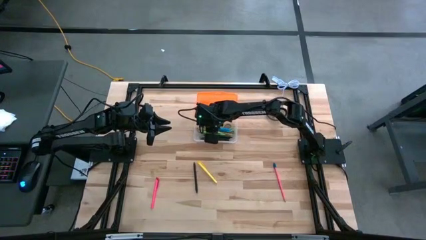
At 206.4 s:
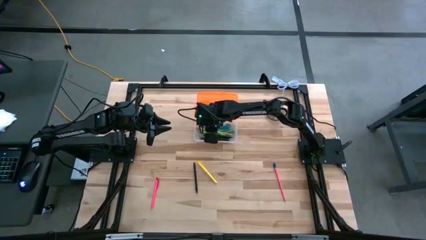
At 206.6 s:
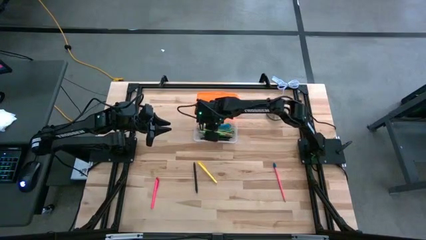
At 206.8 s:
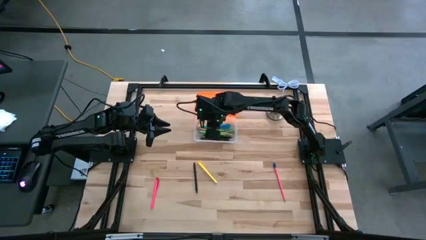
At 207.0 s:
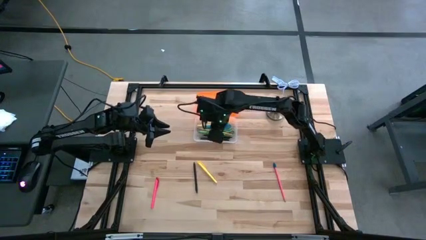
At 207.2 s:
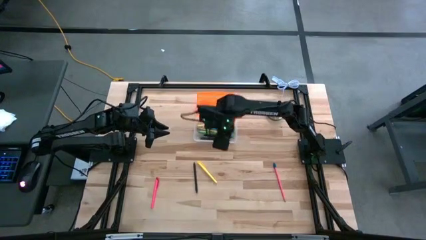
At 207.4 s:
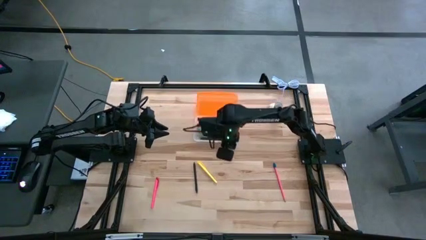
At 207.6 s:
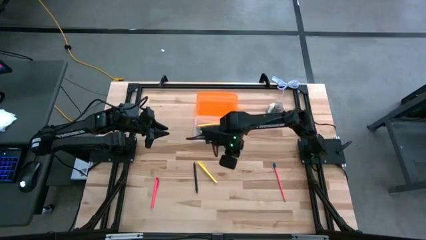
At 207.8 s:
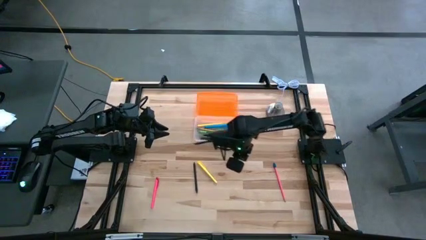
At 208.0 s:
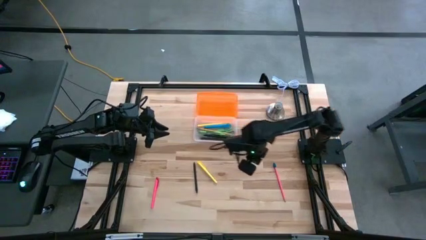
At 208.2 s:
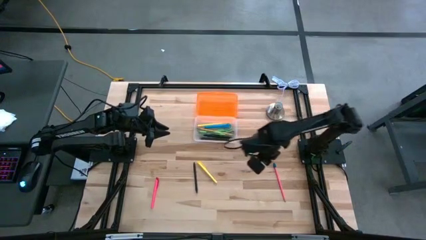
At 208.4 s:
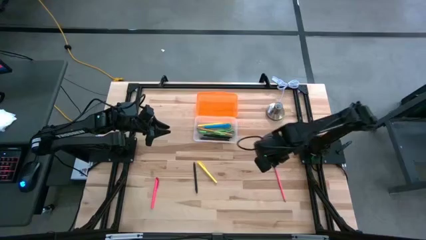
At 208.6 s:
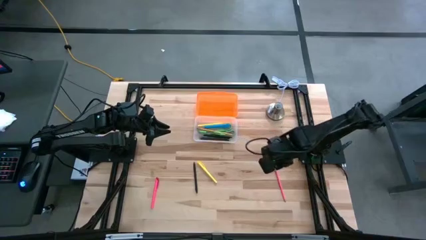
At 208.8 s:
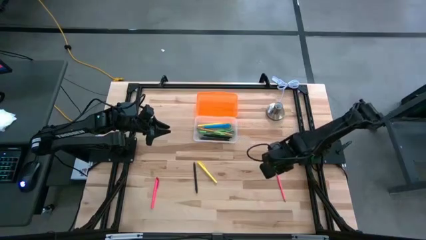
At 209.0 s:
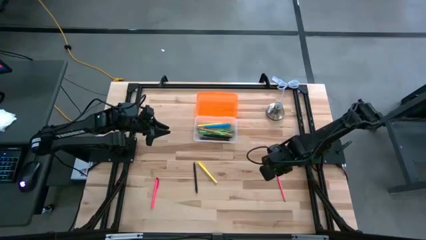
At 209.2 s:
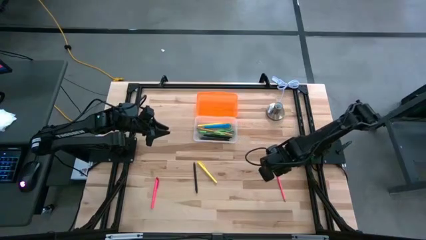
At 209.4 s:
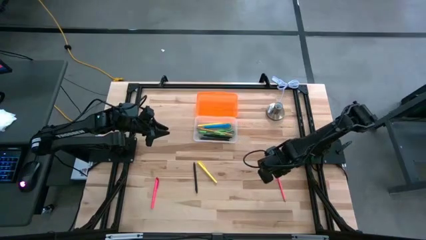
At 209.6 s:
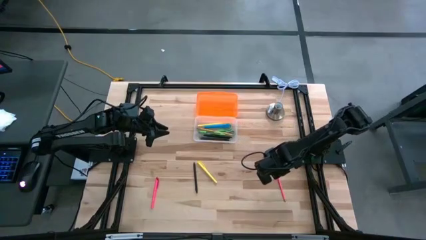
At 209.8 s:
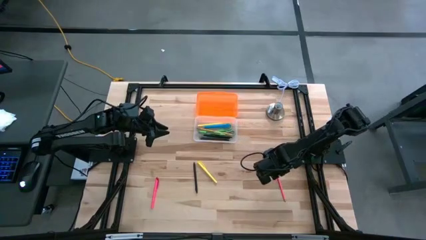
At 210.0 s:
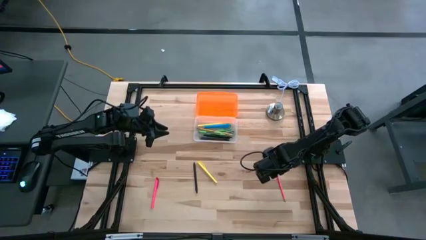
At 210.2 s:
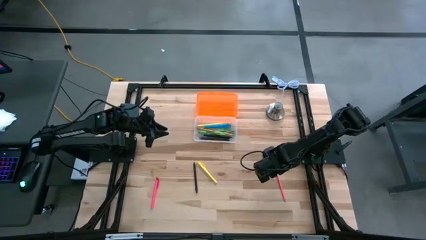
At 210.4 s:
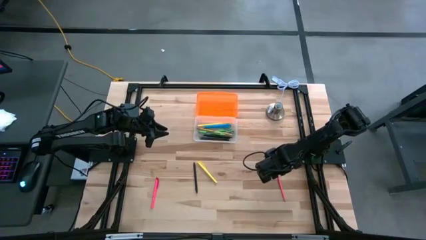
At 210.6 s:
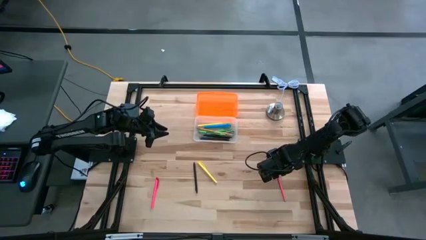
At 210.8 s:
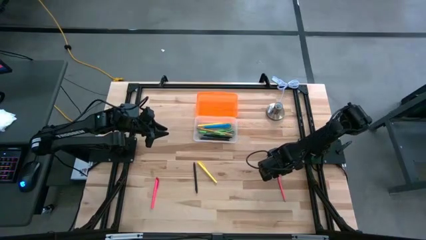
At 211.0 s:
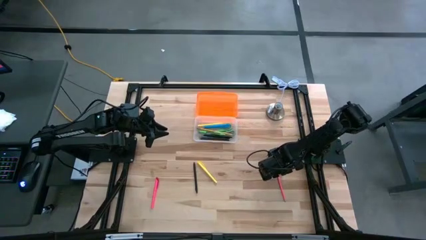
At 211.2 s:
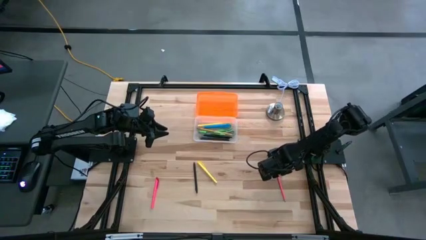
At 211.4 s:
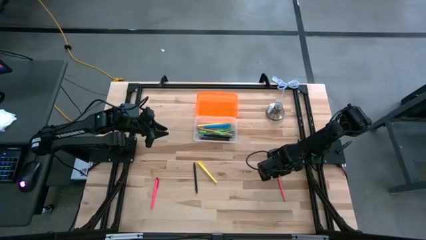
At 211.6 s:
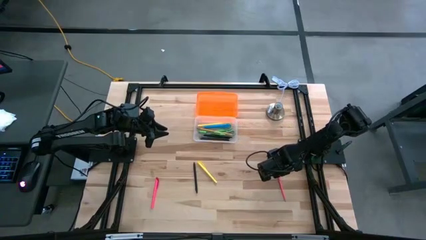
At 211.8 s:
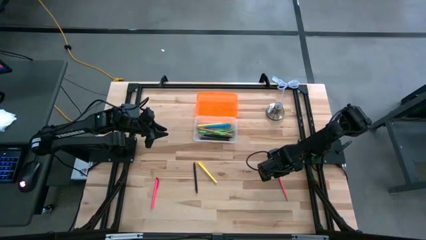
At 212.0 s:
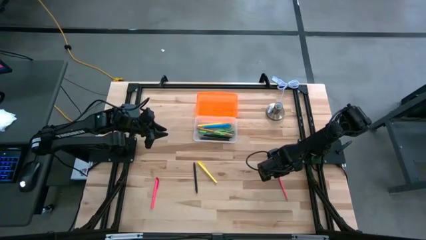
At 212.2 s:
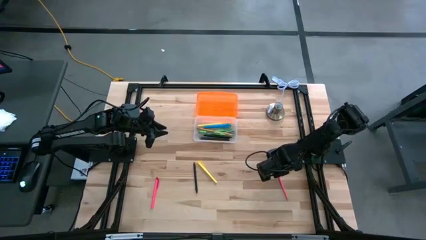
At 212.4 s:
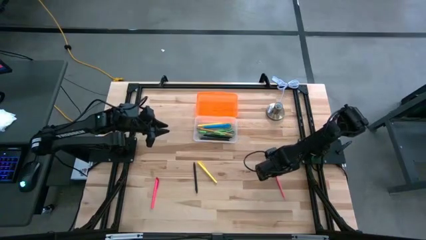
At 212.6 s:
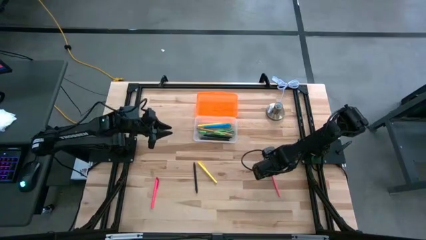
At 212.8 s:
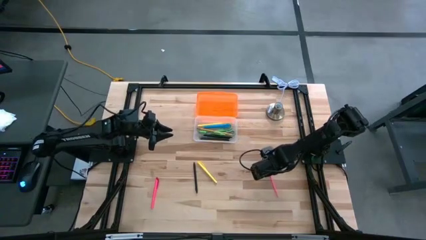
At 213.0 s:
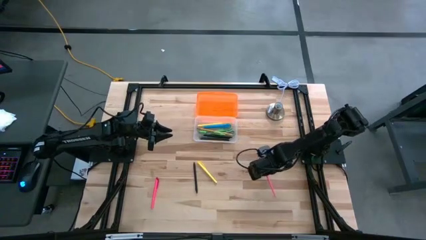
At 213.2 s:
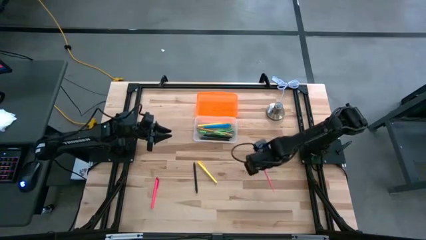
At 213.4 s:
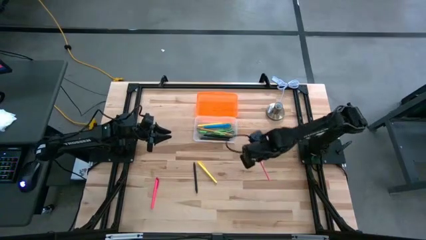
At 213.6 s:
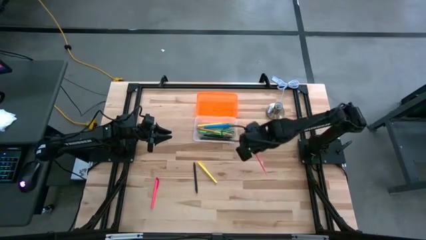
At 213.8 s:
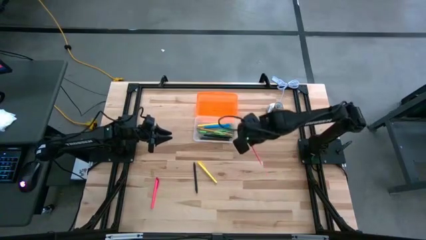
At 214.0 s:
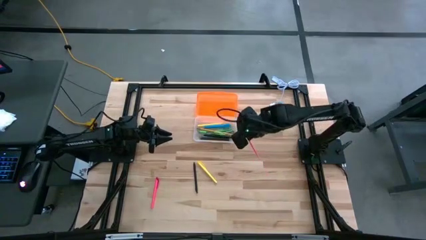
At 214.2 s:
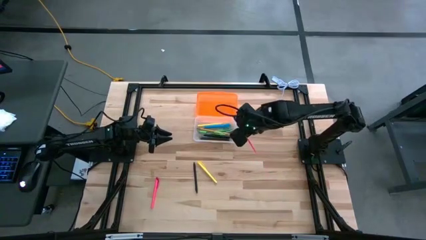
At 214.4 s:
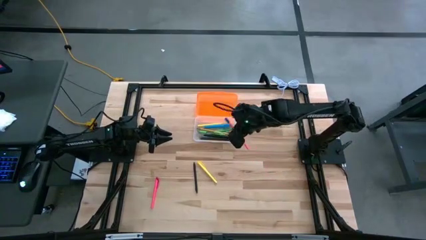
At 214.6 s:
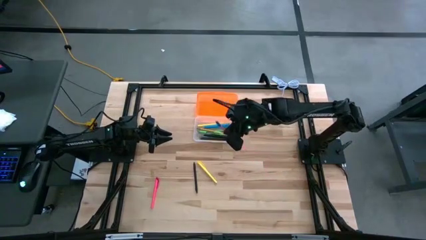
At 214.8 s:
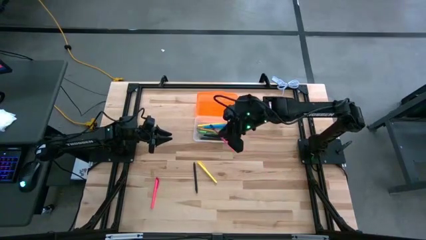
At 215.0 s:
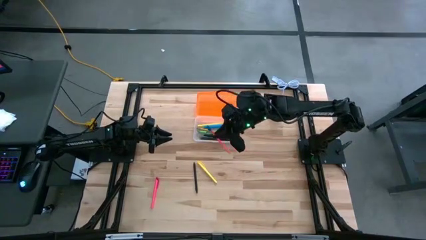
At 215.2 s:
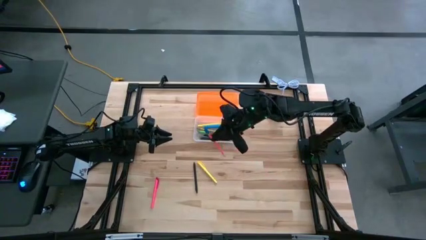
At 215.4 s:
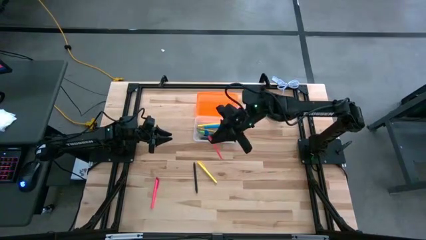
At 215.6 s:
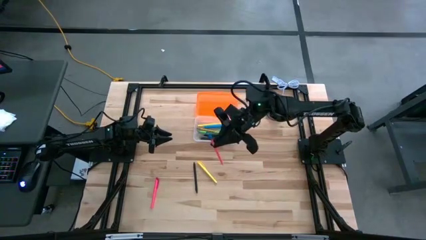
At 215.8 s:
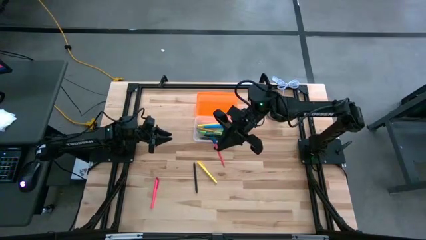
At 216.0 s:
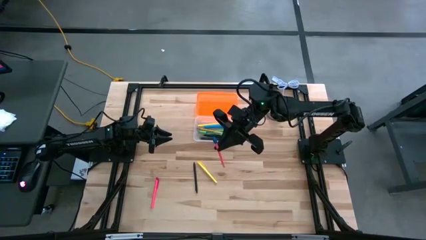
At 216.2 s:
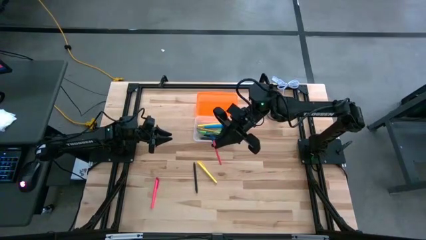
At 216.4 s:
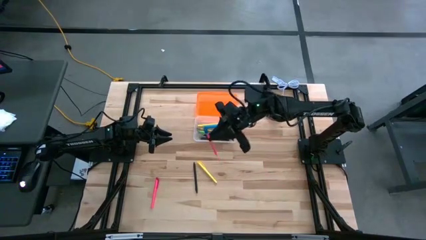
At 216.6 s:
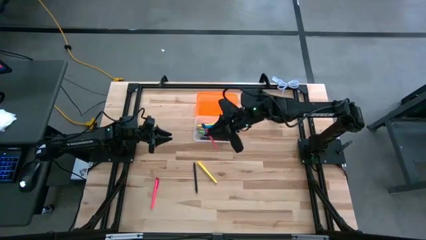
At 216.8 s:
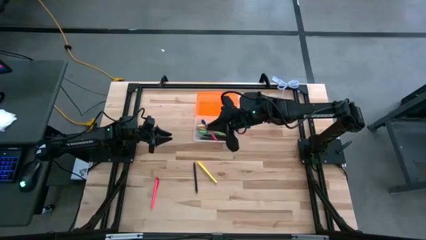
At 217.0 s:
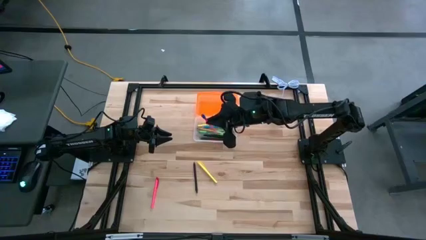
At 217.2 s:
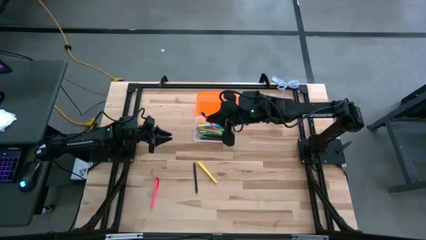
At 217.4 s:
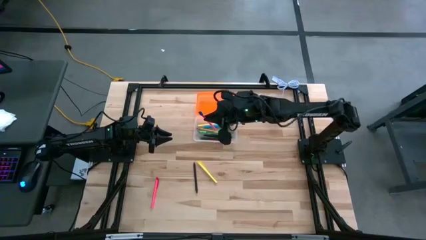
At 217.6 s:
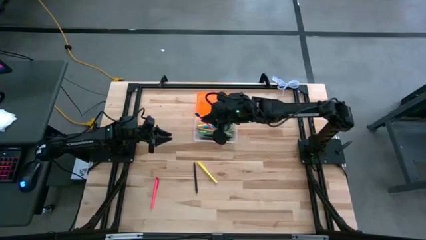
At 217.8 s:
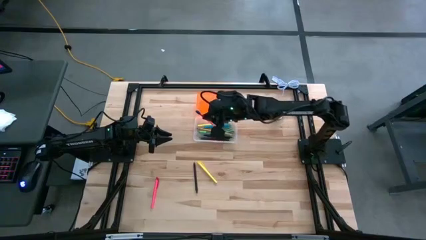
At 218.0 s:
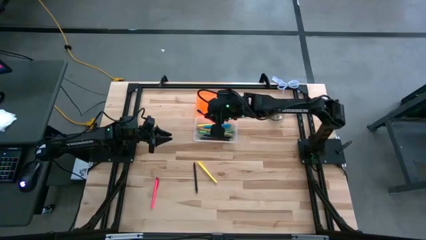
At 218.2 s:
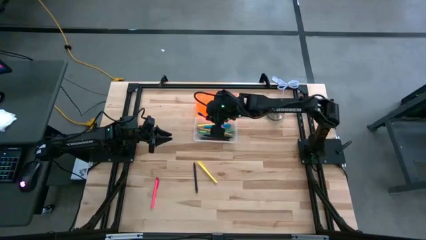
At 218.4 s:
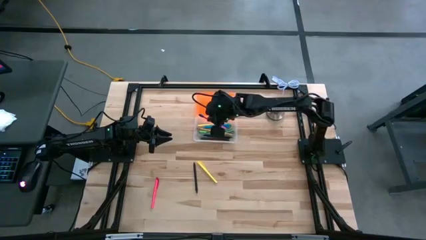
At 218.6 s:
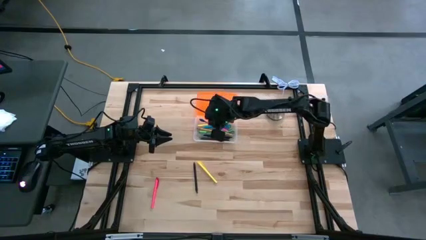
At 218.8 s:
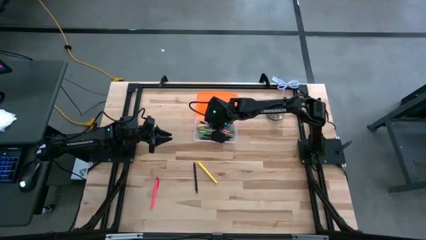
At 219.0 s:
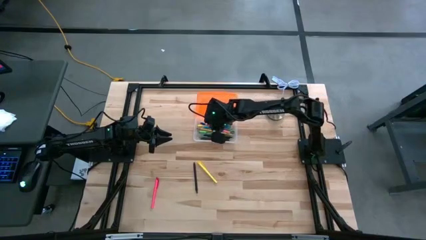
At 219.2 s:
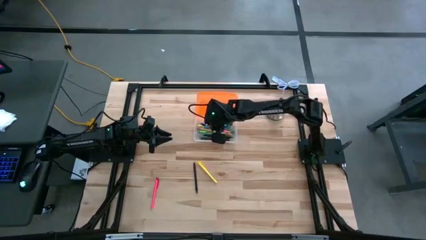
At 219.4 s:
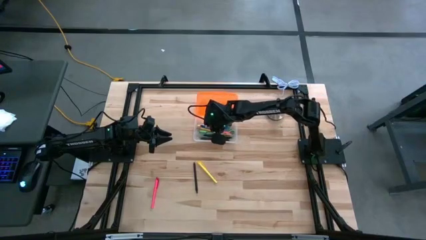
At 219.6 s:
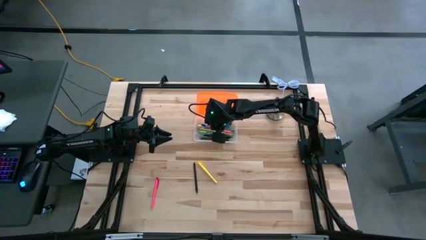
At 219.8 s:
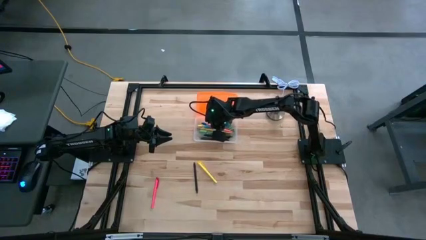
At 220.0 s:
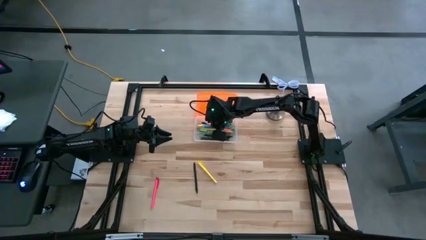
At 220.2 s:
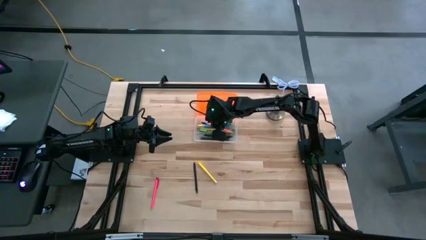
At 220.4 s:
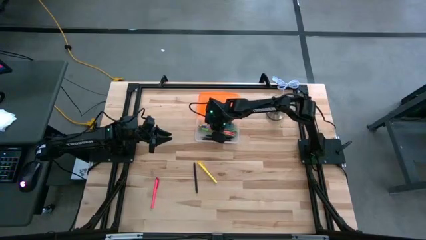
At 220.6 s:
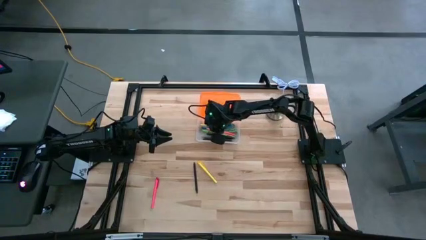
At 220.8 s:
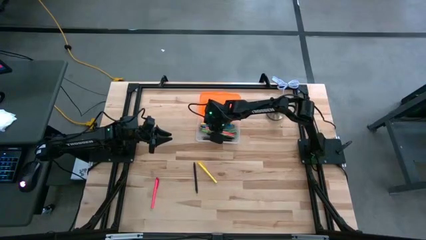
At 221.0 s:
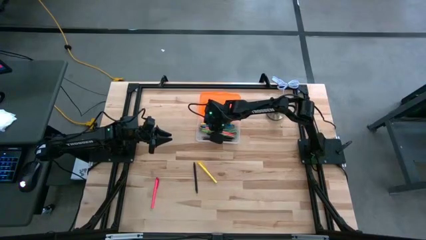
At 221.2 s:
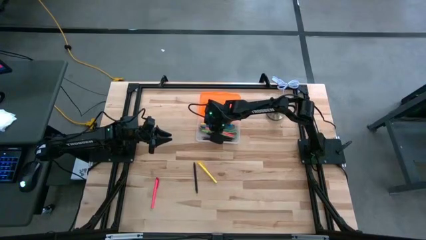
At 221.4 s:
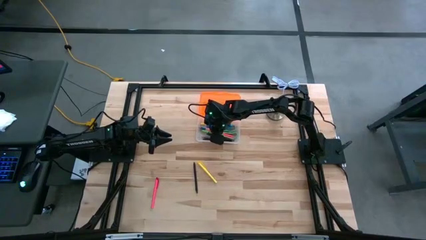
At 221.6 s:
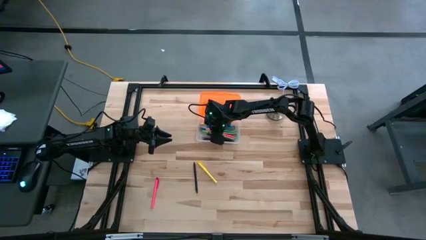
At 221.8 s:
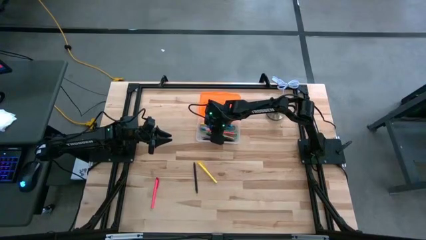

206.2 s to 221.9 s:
Task: Pick & place school supplies into a supply box
Put the pink pencil into the orange supply box

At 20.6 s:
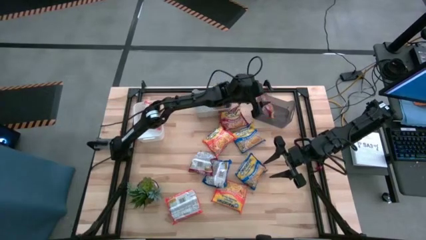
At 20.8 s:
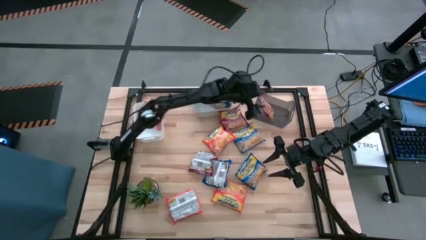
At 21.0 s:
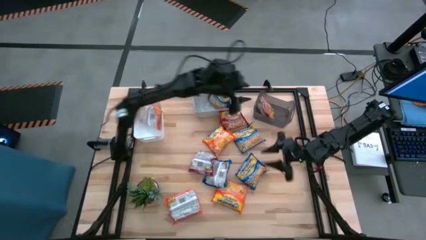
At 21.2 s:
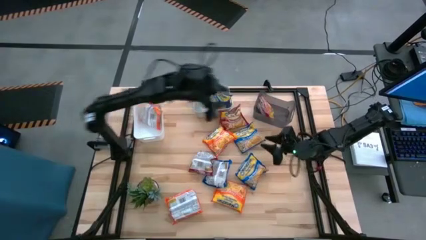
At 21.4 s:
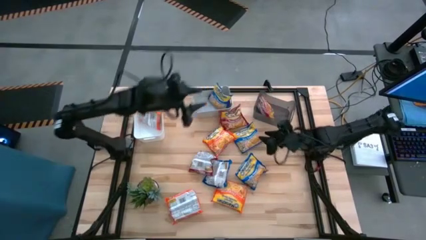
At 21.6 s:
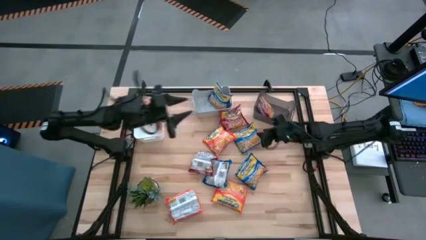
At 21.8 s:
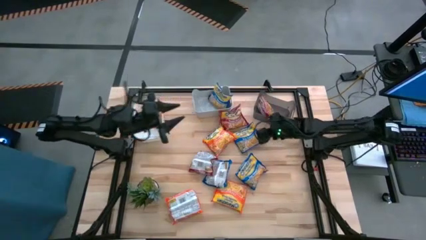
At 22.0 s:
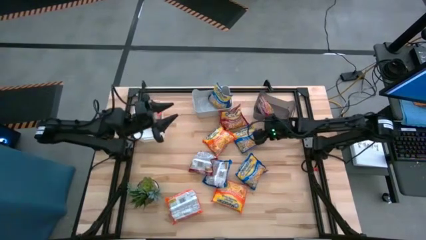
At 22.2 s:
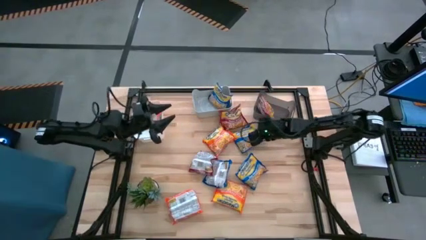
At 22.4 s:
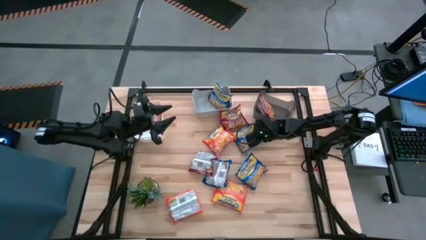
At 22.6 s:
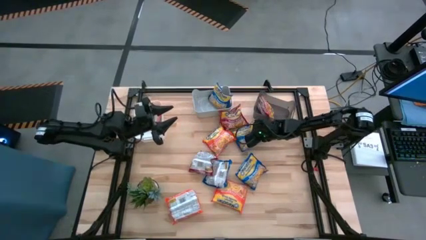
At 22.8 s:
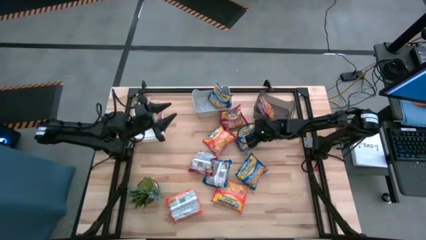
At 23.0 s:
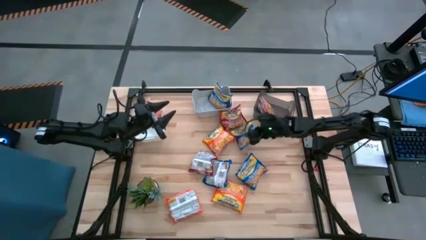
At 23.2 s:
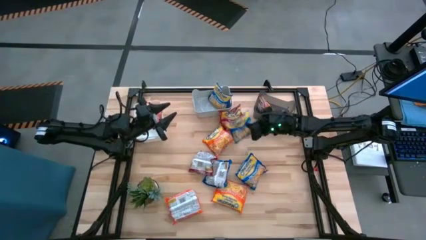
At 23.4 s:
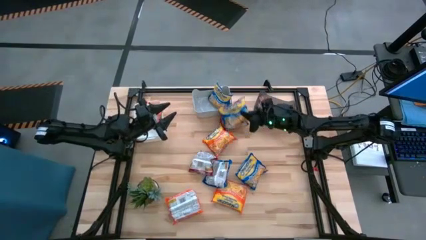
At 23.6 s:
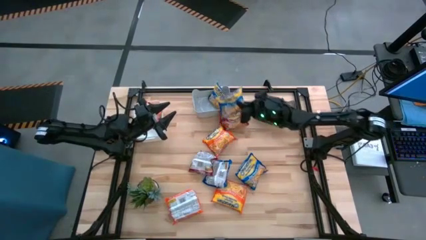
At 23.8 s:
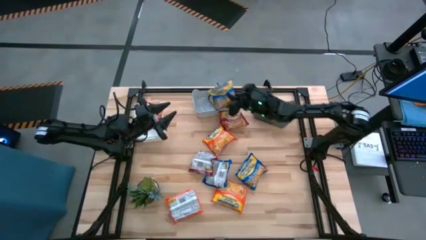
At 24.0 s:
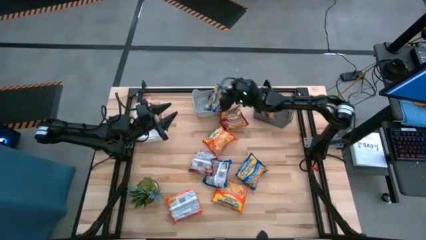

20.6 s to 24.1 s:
Task: Sort Maruchan noodles
Put the top right middle blue noodle pack into the gray bin
